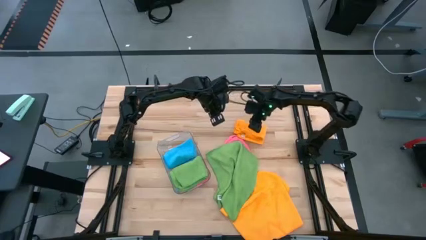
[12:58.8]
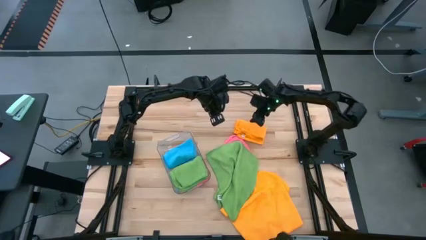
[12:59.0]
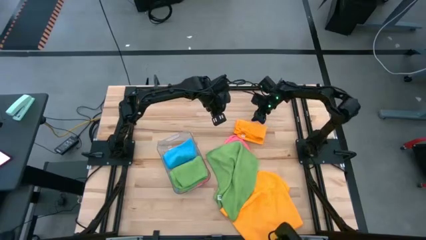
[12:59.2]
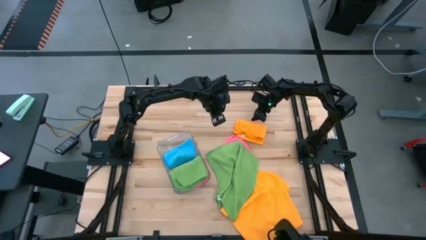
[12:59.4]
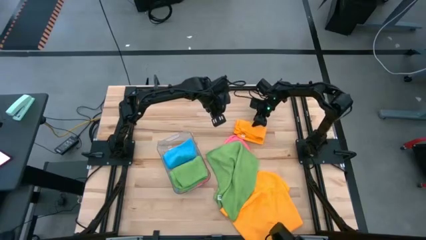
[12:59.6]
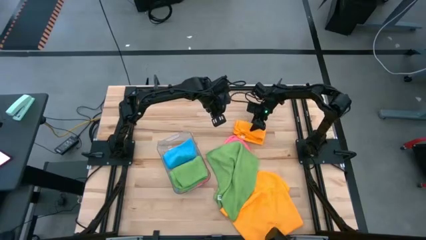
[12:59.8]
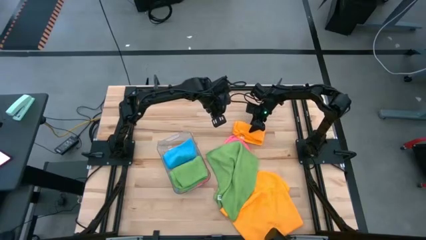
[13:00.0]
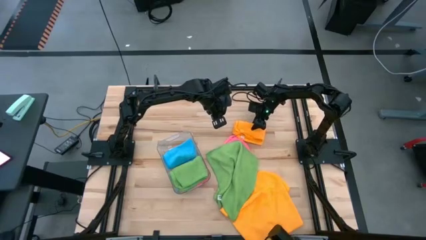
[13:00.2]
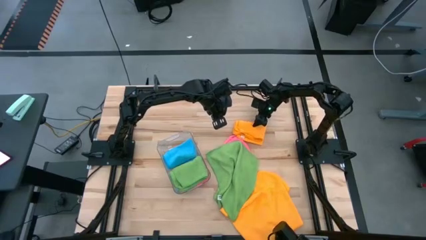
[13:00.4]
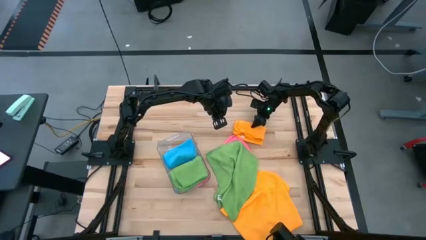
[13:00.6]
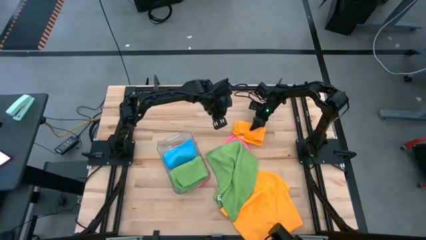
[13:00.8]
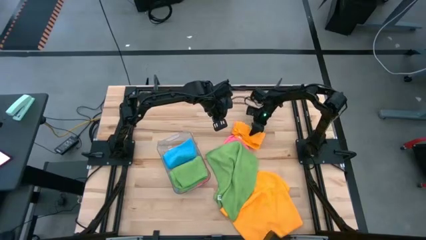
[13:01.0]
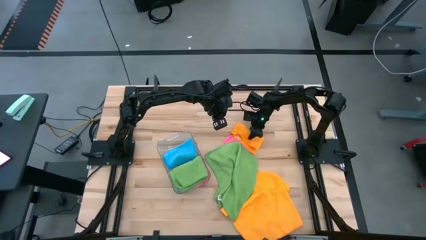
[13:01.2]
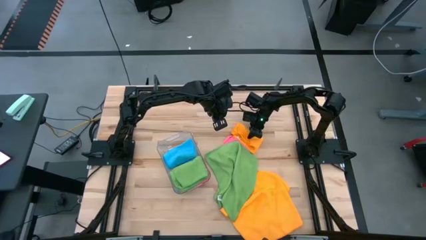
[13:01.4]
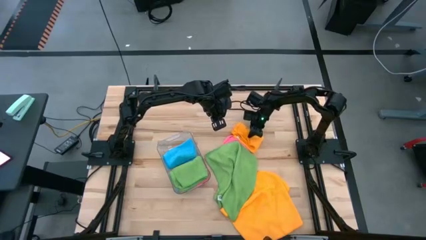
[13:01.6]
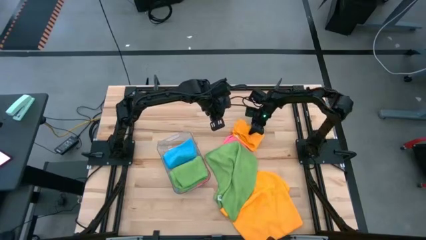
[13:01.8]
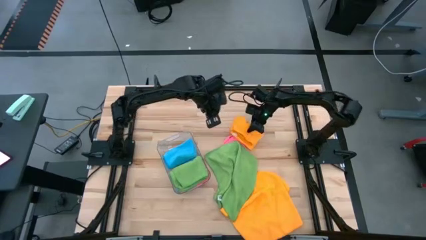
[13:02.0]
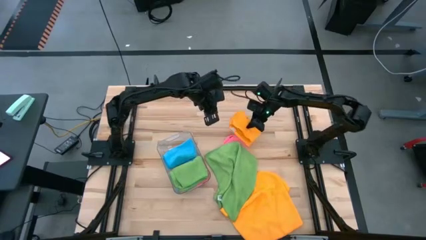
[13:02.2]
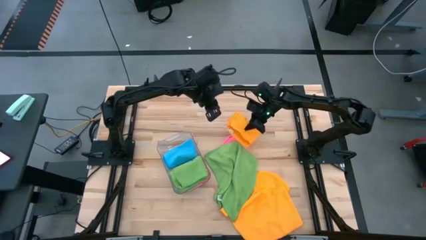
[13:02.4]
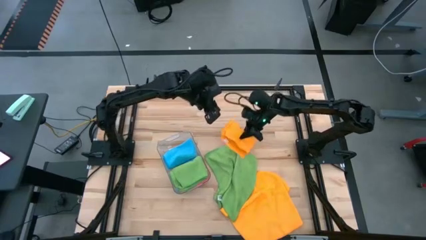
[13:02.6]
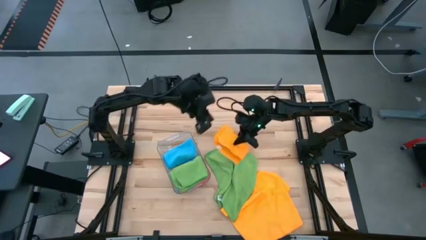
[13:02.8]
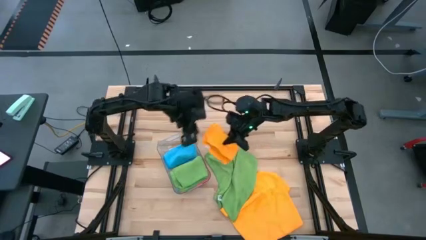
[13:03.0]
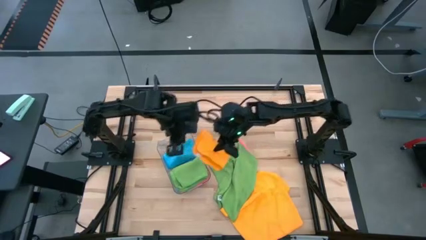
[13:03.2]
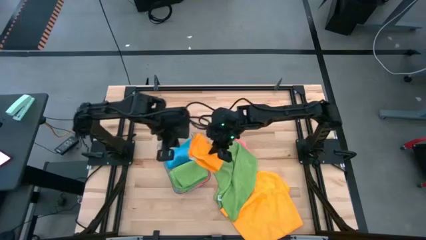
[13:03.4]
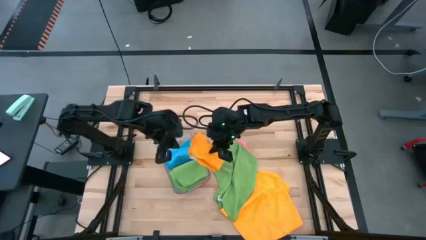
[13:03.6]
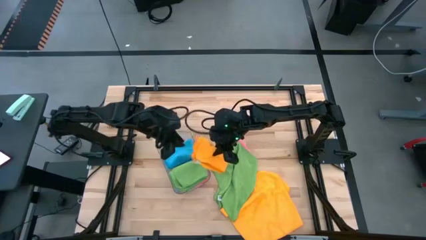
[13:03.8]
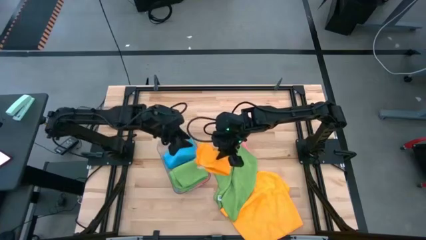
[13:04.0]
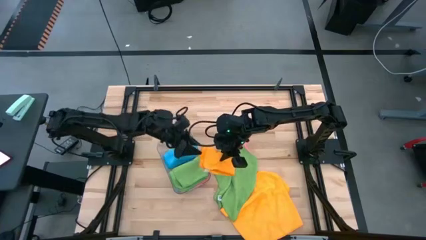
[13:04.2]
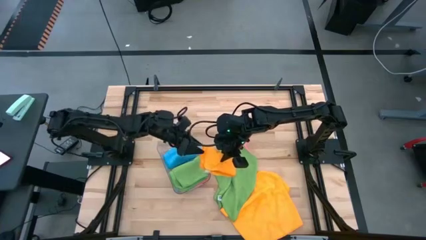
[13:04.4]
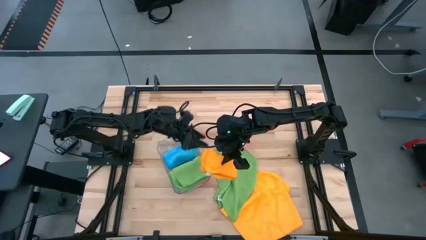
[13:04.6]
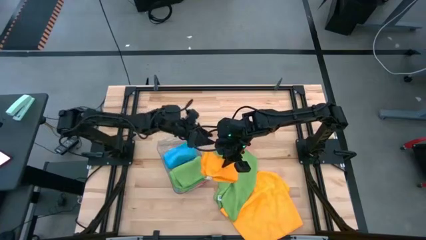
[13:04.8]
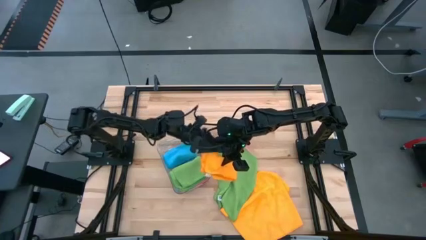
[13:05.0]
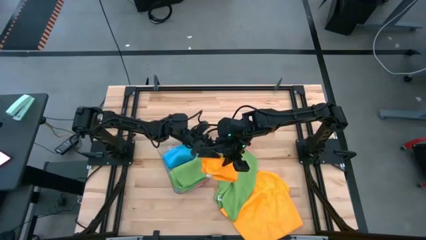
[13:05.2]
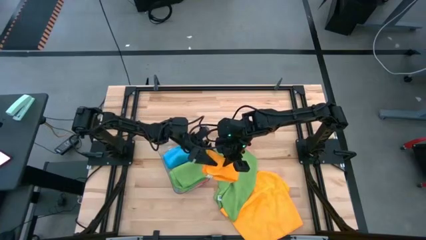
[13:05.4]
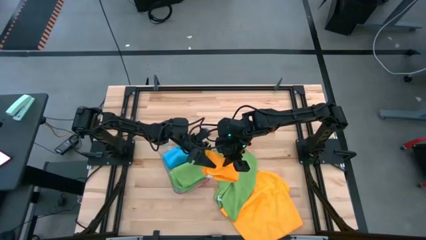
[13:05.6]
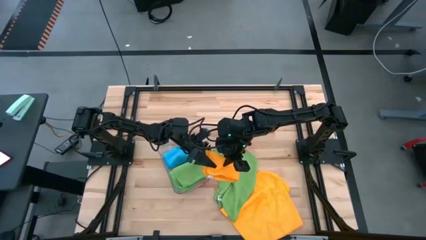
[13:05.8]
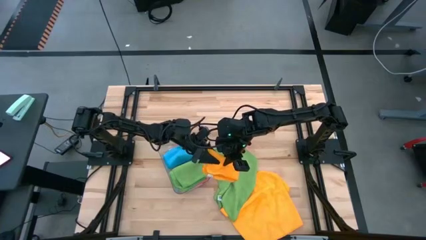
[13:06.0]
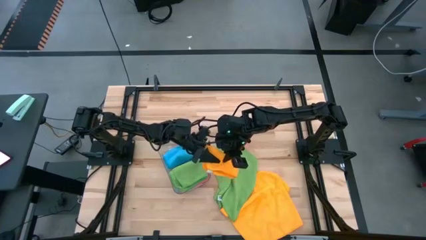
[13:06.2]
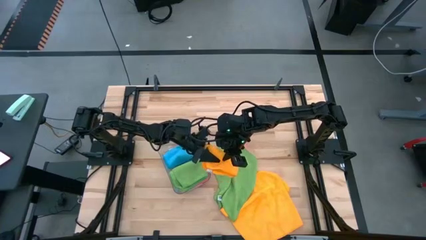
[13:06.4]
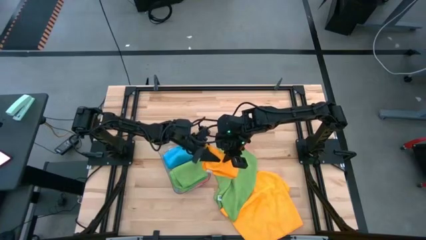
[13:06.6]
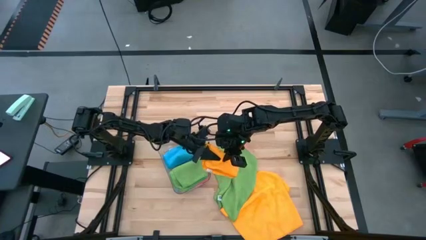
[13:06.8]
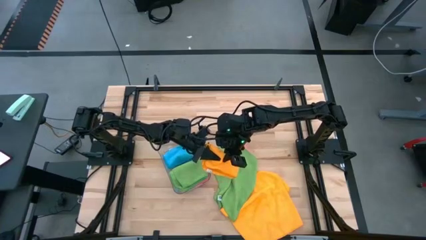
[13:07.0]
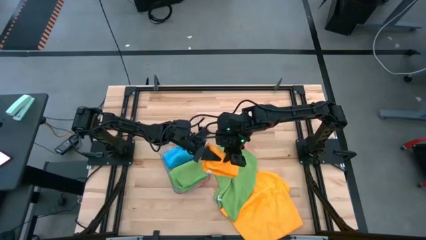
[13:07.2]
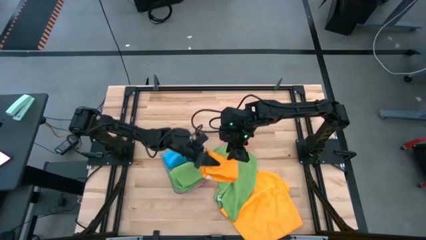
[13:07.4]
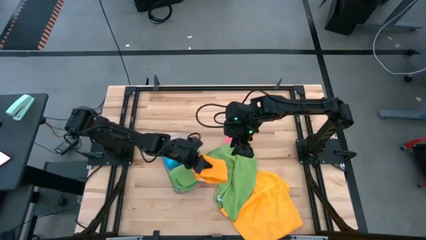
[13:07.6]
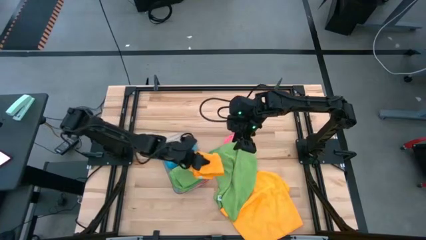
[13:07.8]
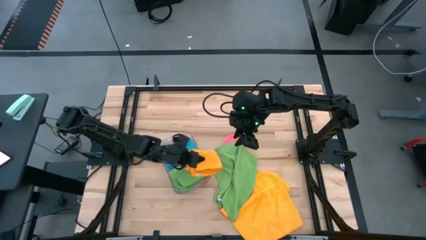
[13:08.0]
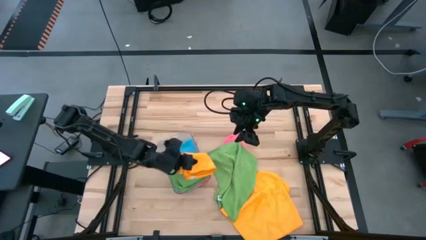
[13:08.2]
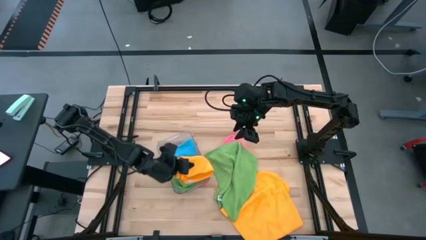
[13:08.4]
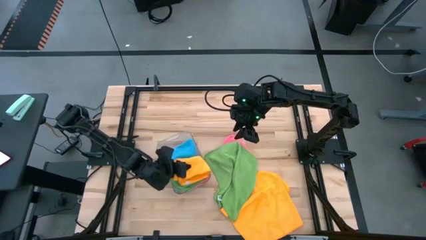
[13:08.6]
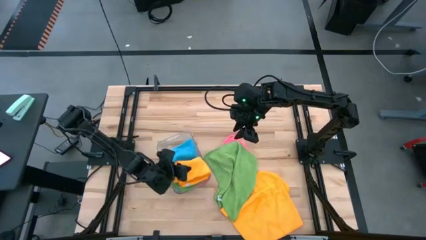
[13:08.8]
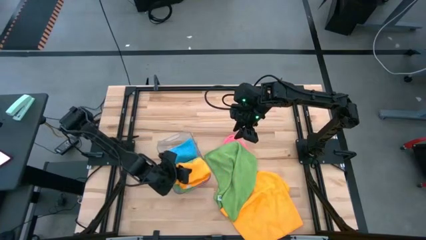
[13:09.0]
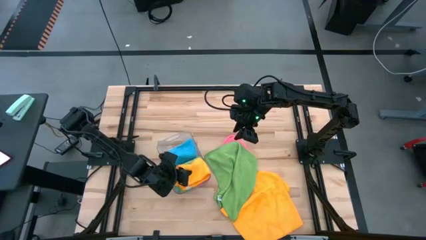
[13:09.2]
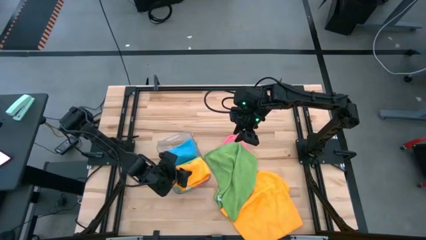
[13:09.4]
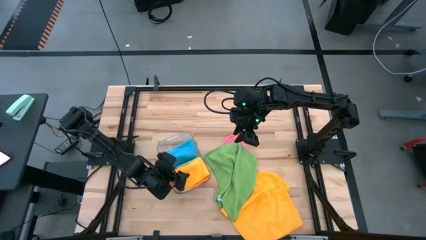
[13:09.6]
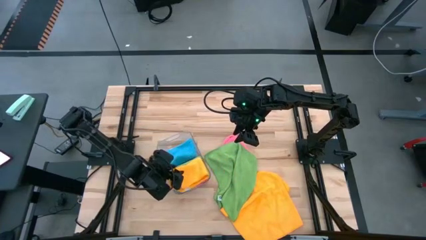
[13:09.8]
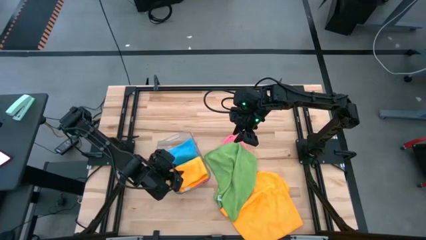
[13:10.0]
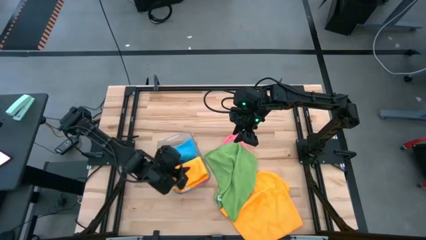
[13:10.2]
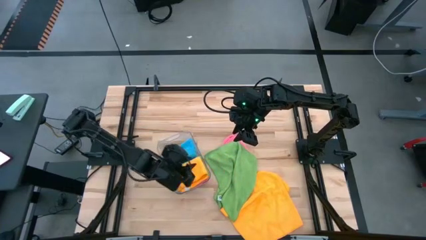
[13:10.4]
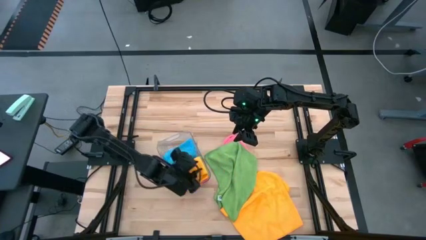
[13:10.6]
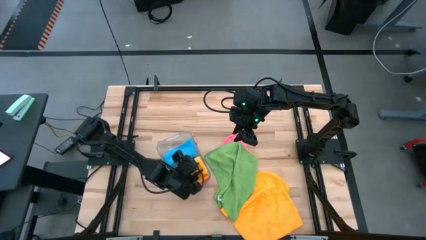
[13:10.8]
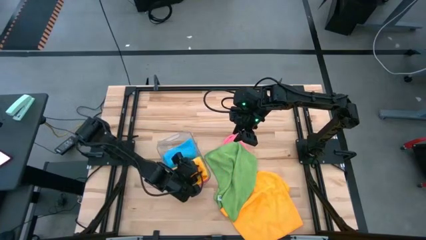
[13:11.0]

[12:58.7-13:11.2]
Task: Fold microfiber towels
Put the top yellow towel into the transparent bin
